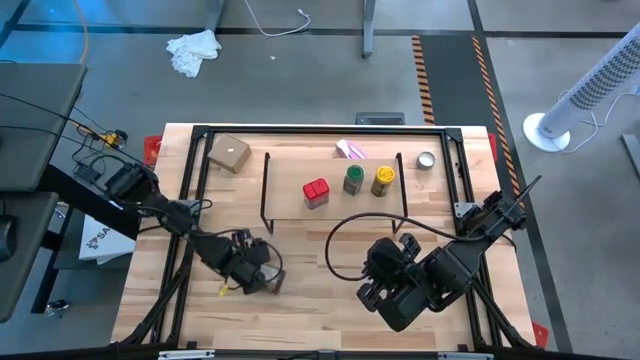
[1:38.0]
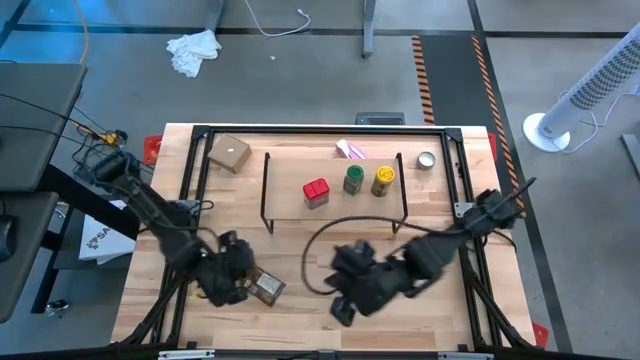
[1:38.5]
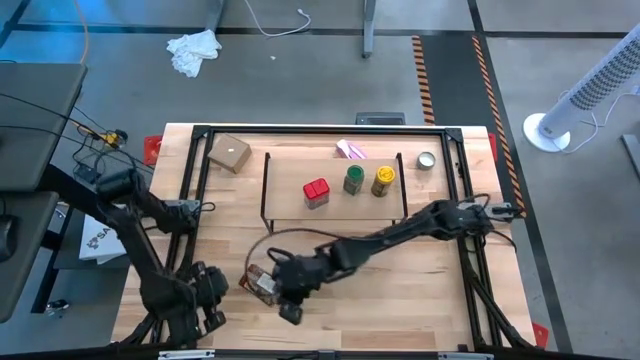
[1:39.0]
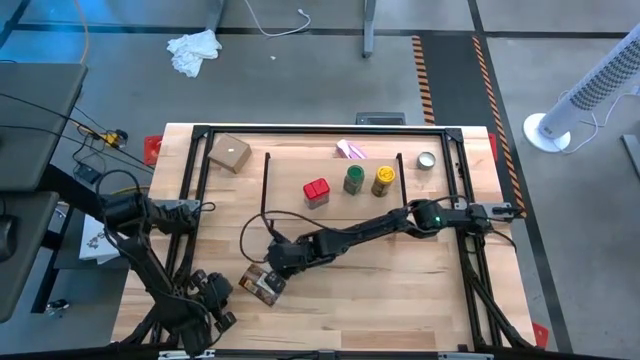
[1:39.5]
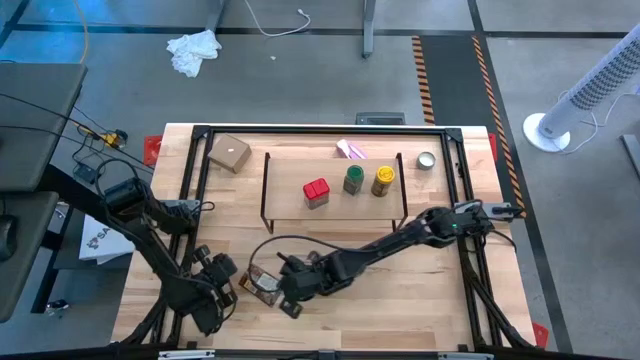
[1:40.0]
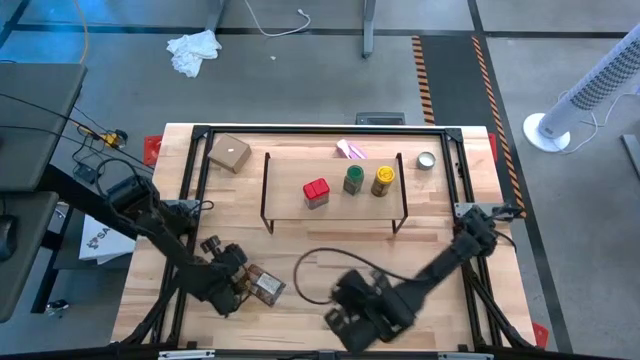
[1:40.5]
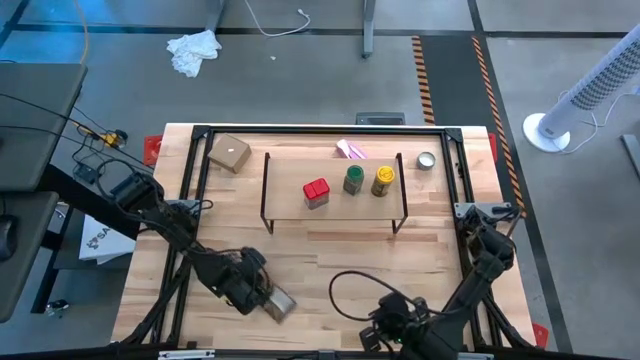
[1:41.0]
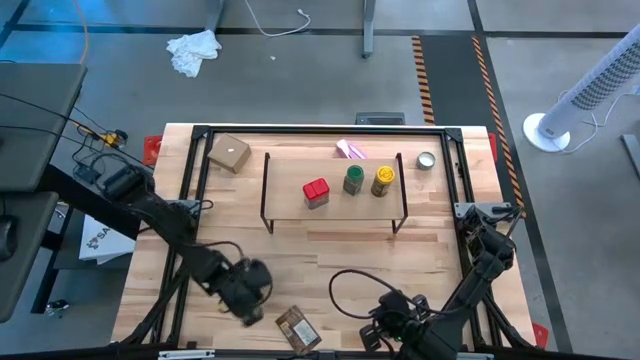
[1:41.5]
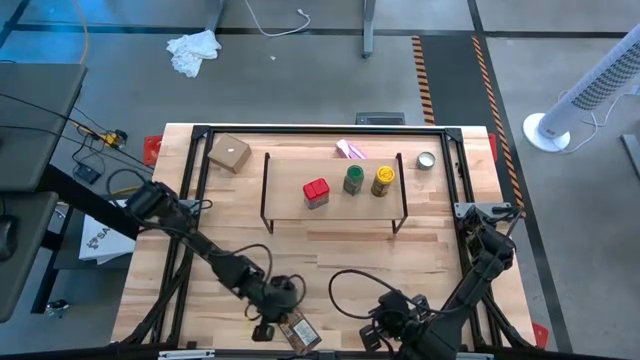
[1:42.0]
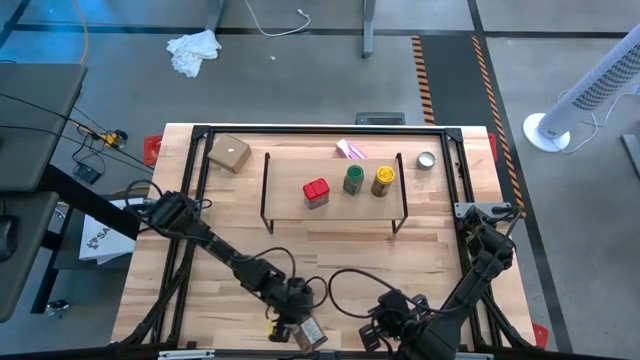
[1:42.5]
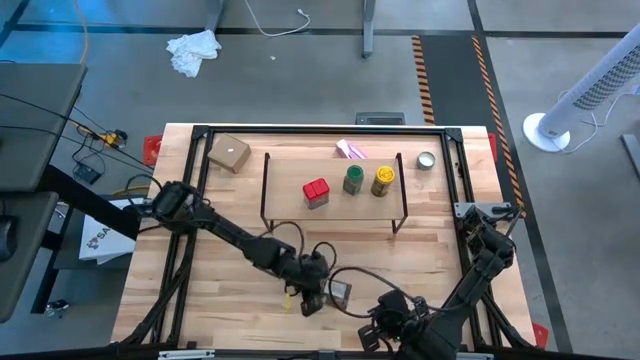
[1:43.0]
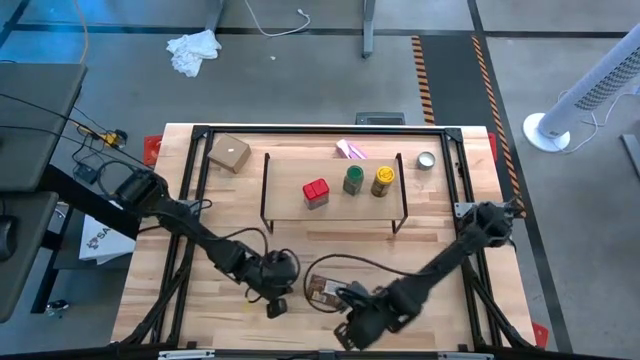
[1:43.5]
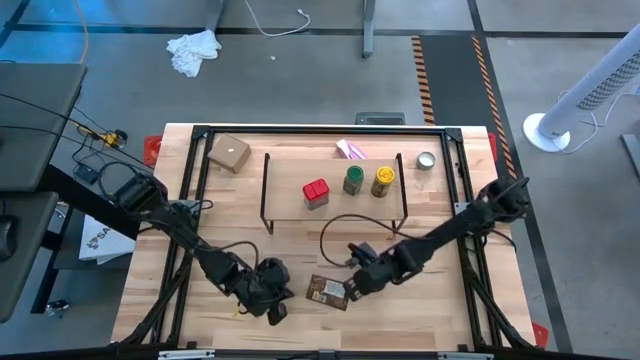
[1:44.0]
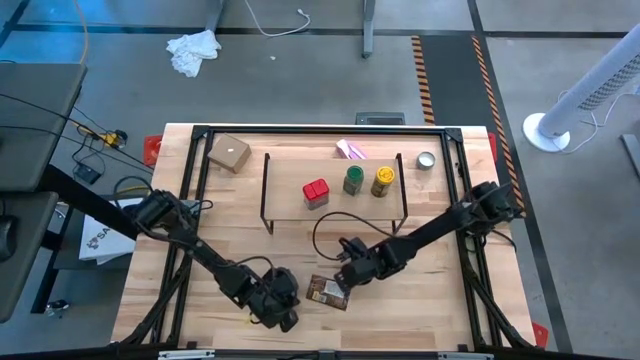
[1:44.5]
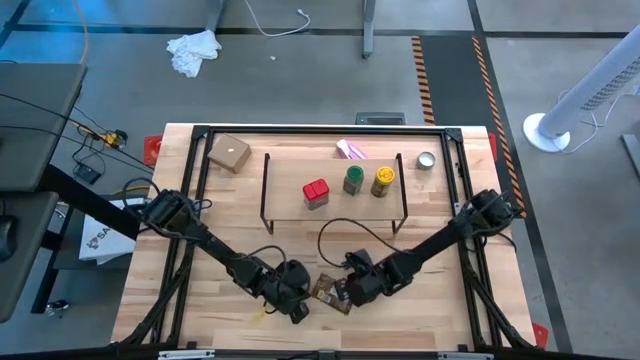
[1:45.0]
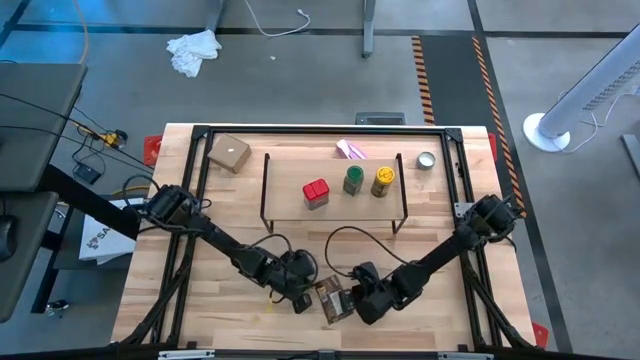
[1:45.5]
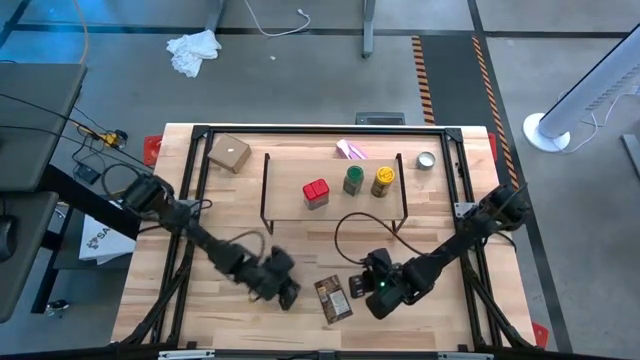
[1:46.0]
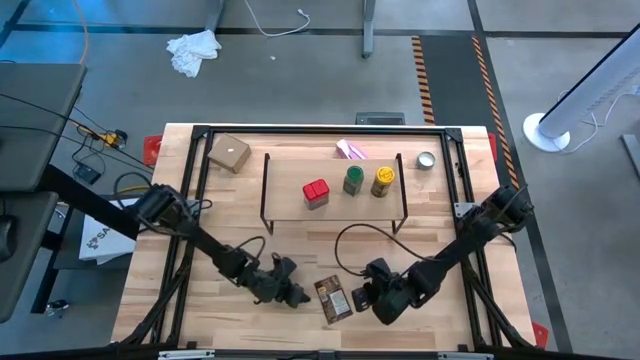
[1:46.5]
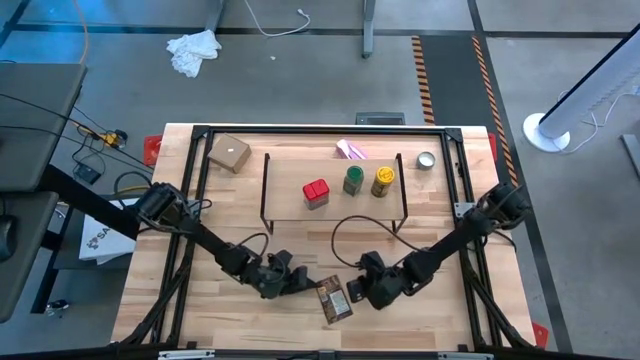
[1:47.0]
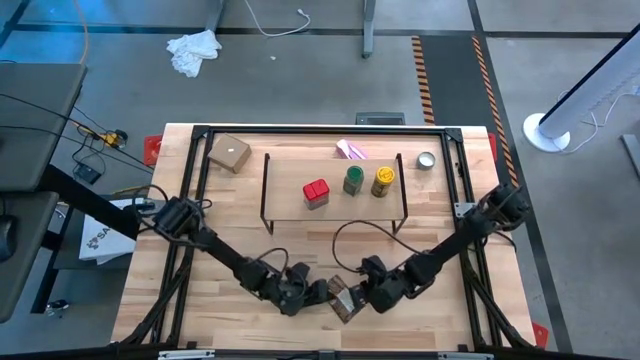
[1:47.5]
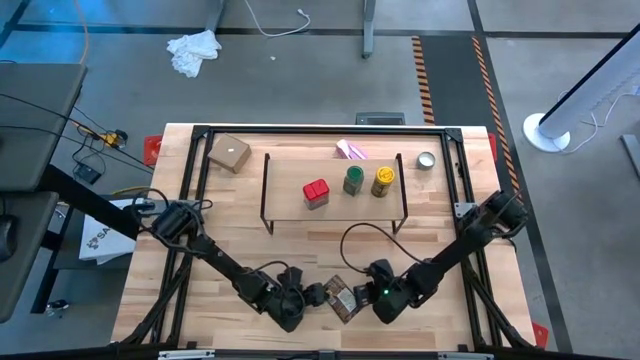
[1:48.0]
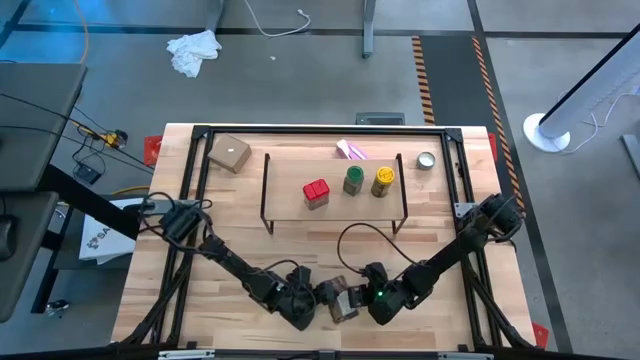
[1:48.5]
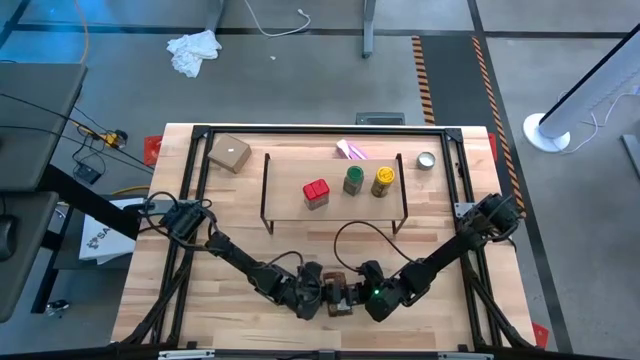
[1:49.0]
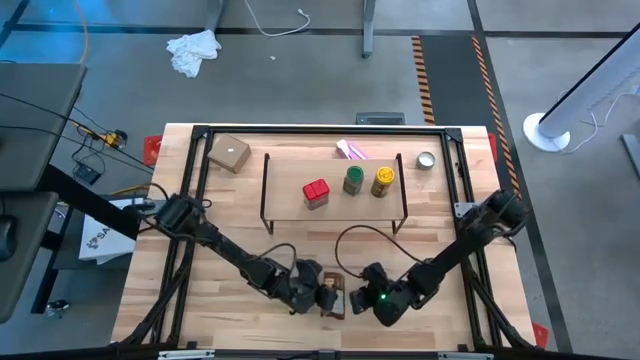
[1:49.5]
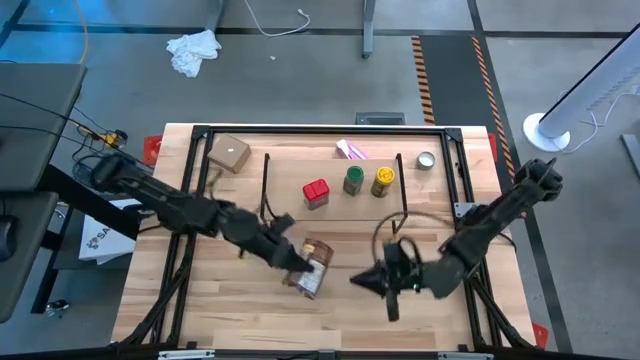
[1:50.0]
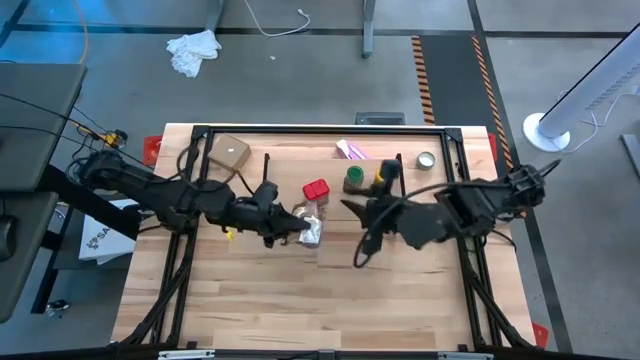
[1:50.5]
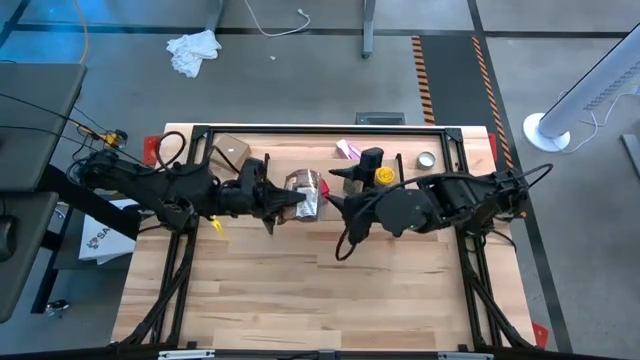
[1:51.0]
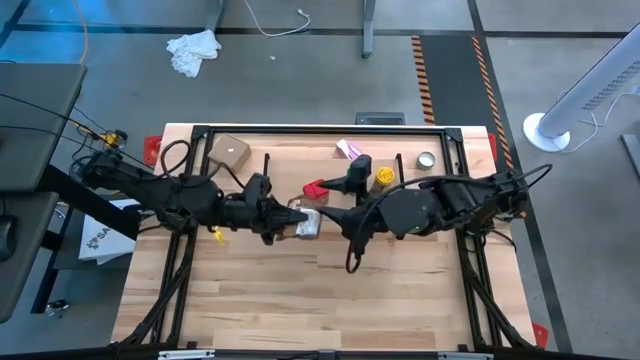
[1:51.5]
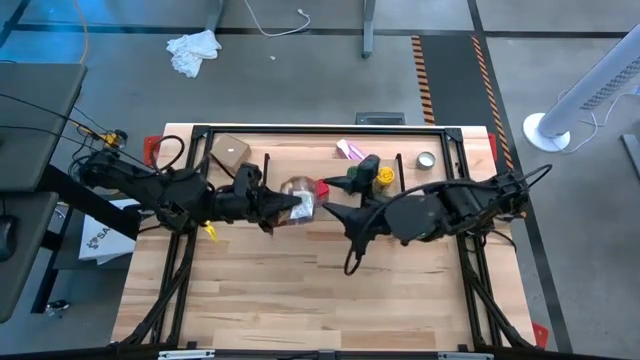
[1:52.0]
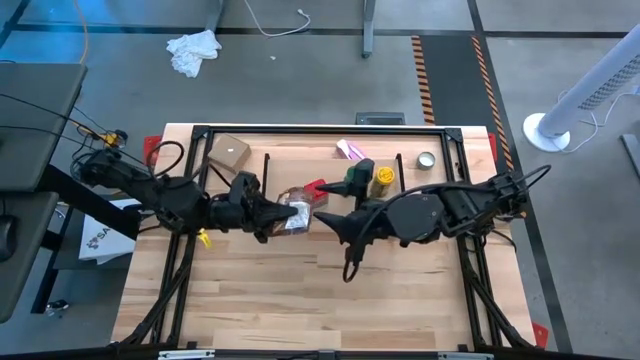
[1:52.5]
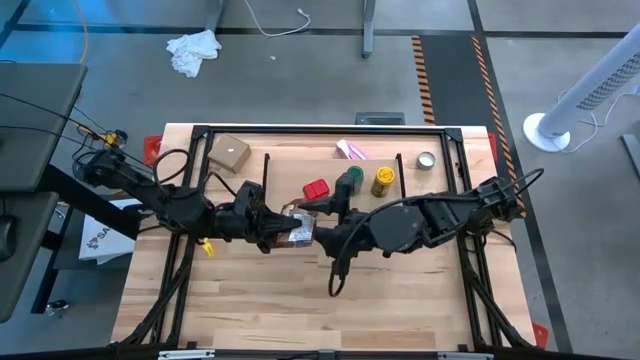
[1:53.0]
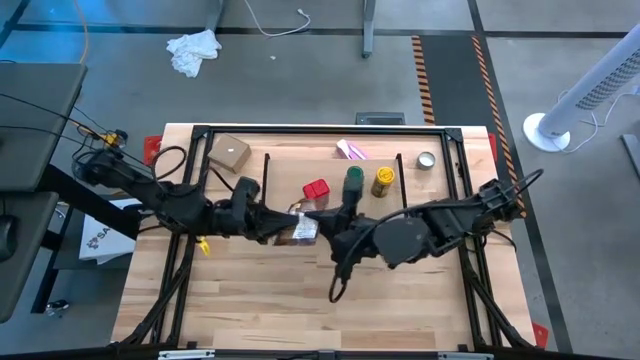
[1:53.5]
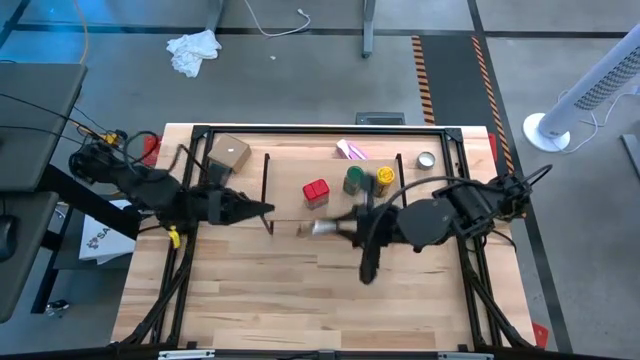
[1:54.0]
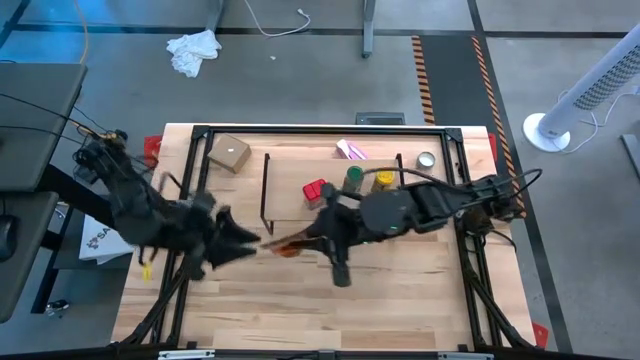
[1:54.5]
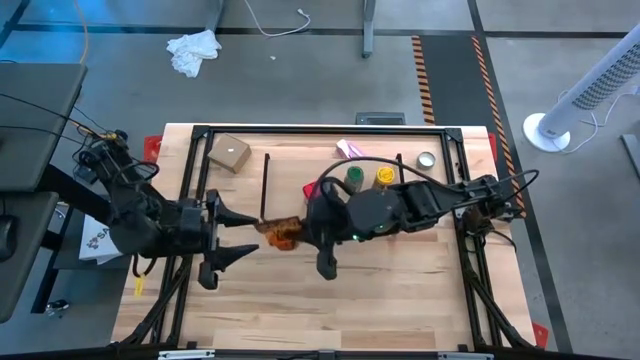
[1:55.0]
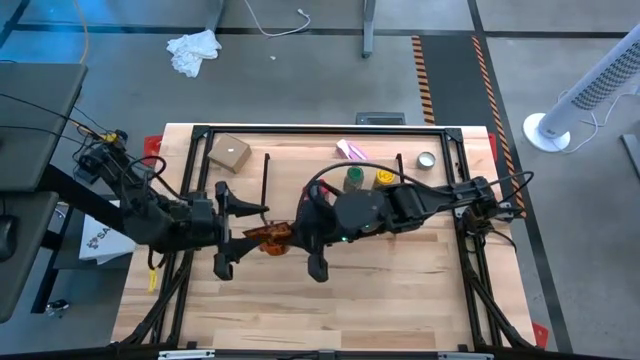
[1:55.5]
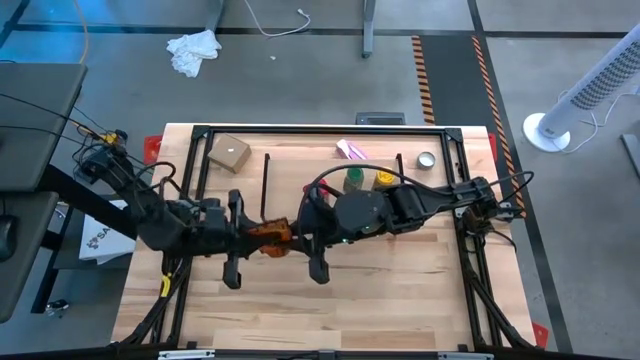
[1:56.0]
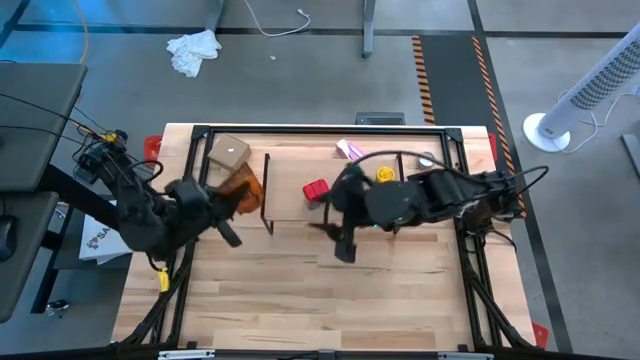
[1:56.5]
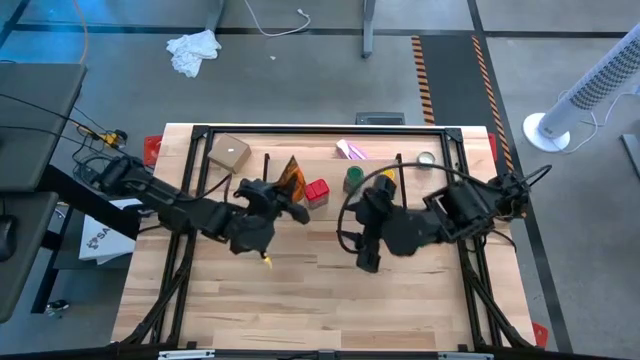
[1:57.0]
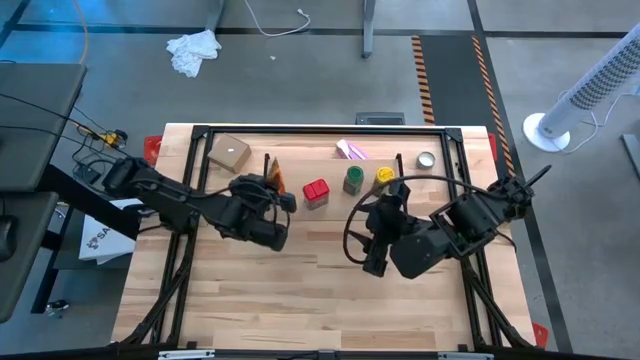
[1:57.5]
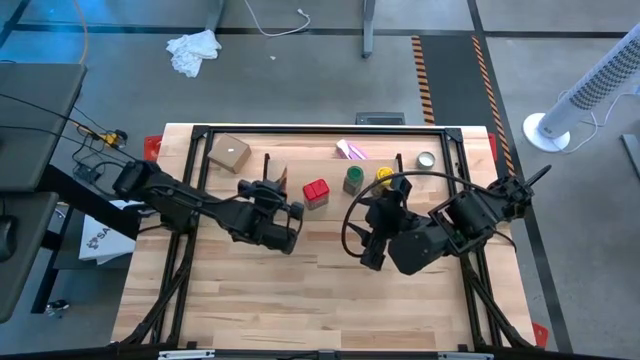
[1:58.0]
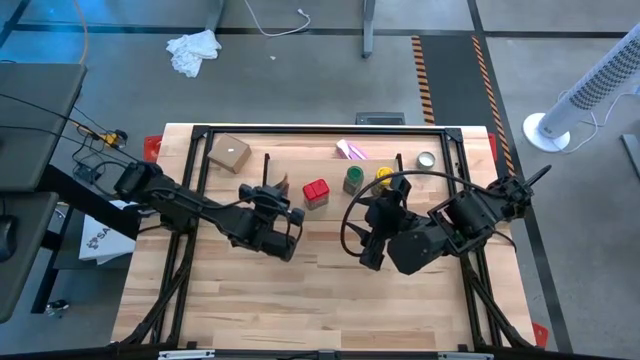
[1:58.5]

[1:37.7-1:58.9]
Task: Shelf spices
Put the seasoning pack on the shelf
